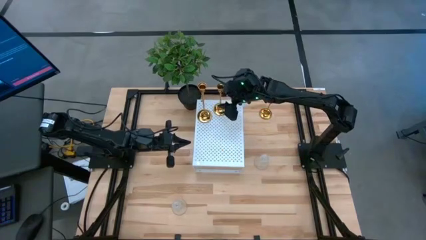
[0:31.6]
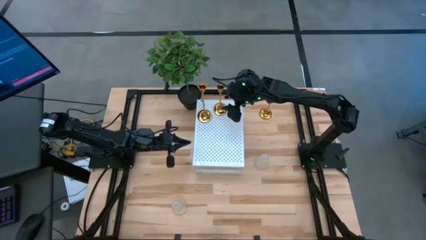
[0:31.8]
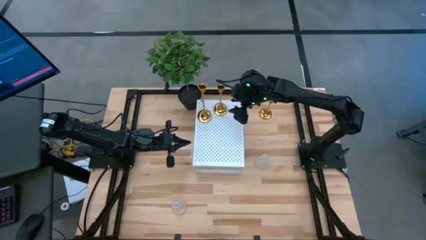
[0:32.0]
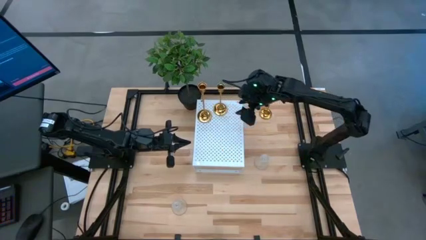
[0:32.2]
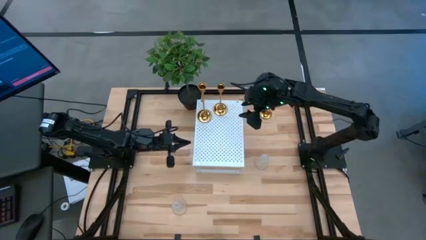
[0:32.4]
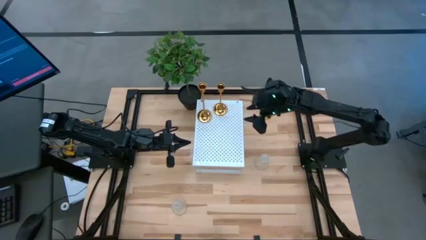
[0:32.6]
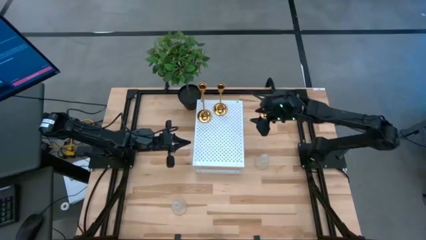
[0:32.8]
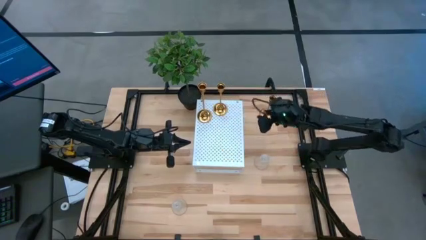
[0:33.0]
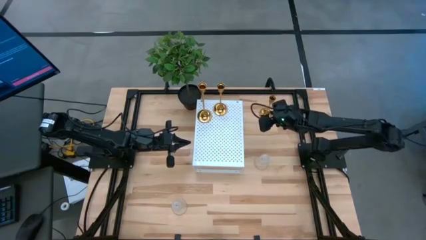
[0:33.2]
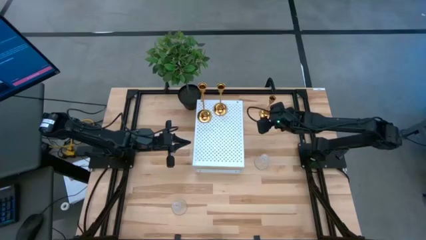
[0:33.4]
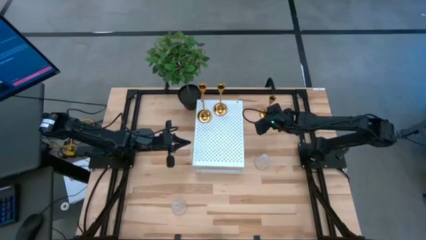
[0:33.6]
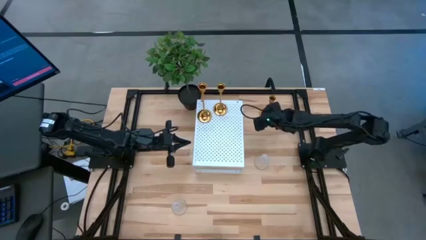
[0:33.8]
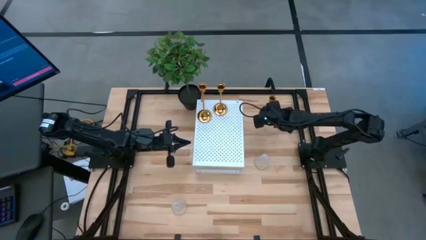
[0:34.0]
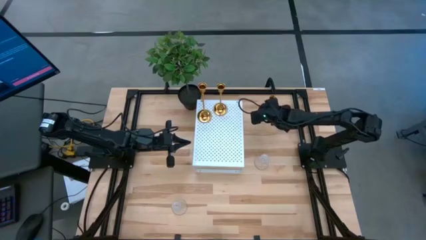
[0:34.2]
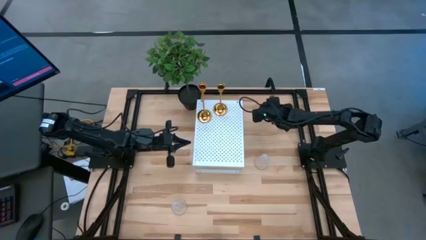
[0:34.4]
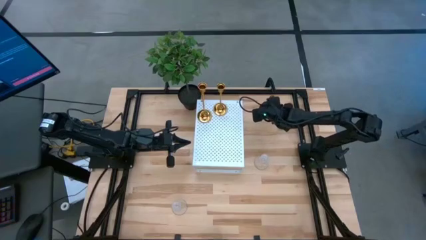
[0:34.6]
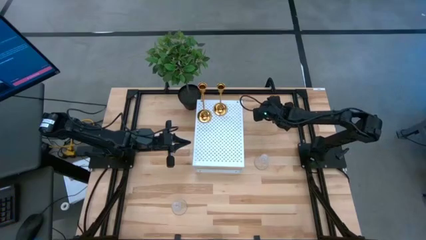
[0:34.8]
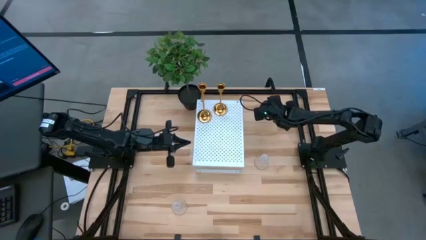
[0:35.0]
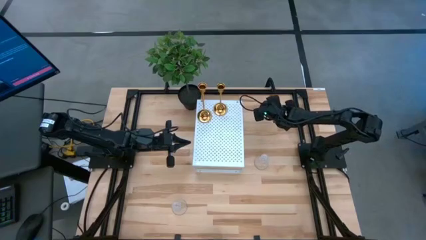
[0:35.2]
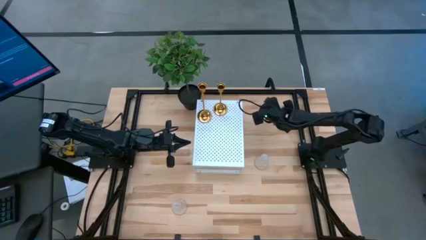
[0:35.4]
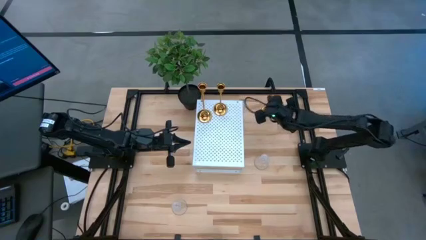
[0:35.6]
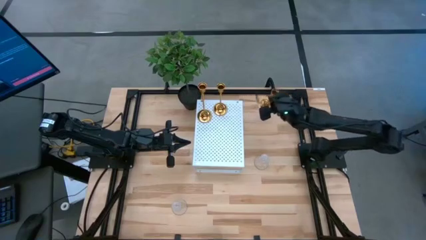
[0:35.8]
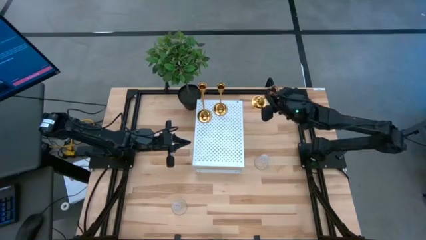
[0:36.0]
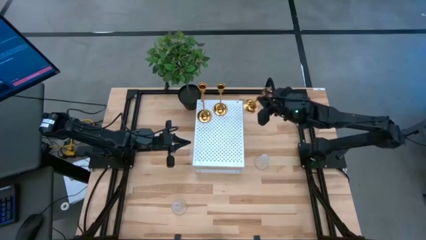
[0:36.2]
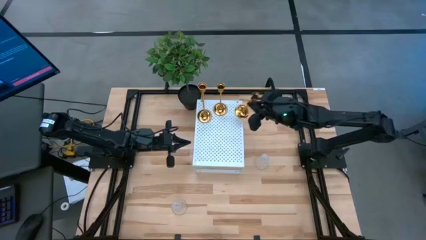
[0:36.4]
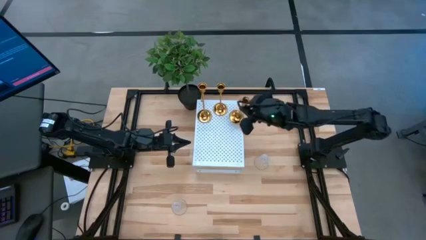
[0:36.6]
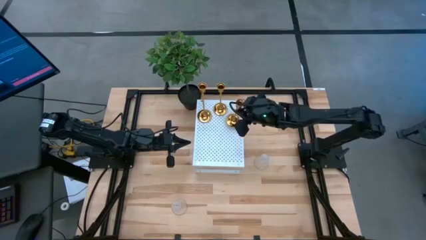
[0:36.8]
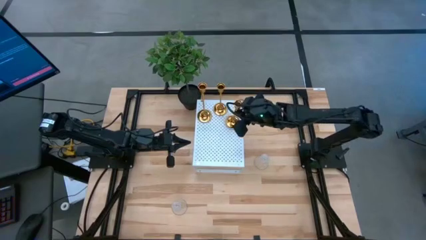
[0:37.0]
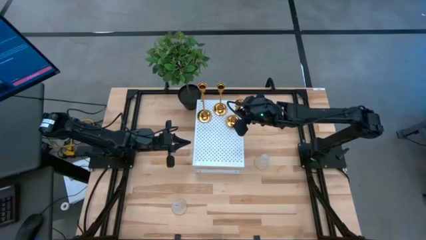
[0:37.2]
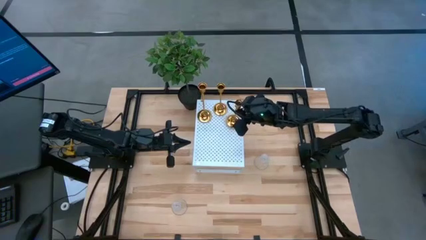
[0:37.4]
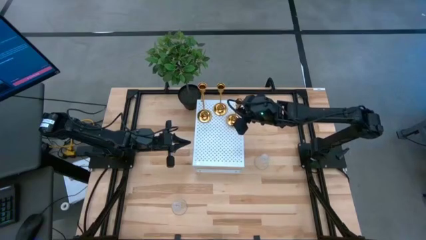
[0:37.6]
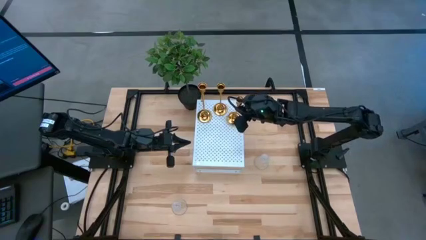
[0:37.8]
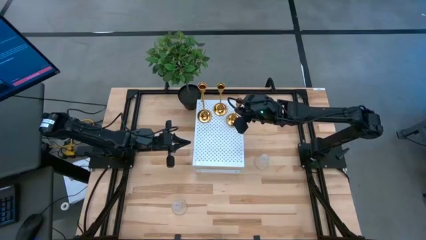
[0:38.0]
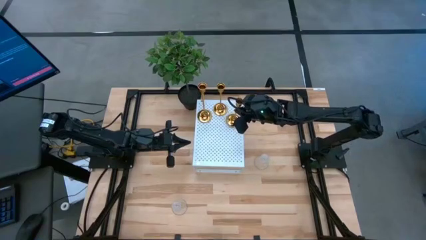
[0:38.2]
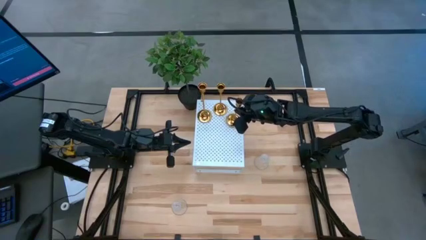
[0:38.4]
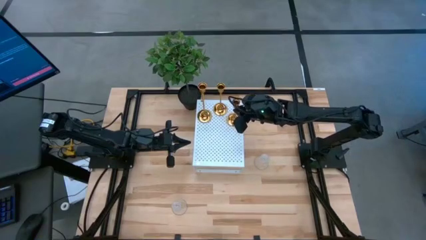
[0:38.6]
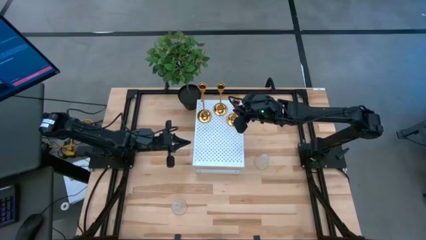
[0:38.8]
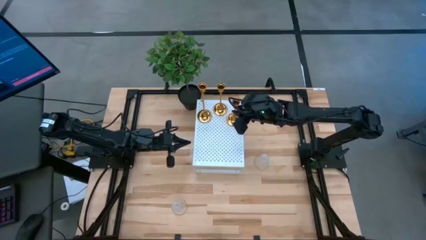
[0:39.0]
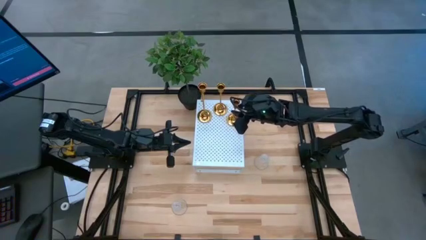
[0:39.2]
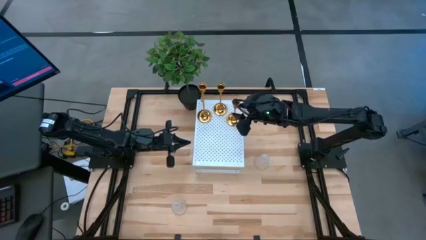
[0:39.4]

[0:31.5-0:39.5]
Task: Pick & Place candle stick holders
Put the gold candle holder on the shelf

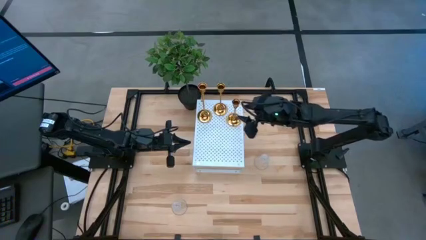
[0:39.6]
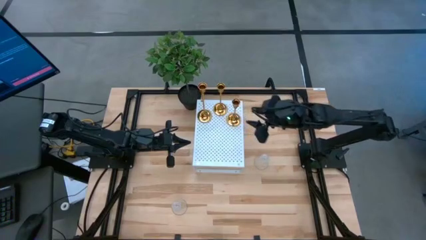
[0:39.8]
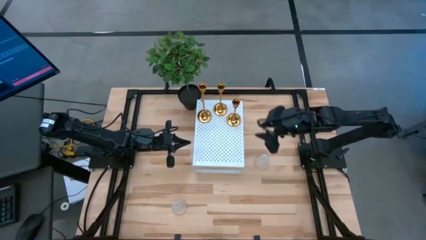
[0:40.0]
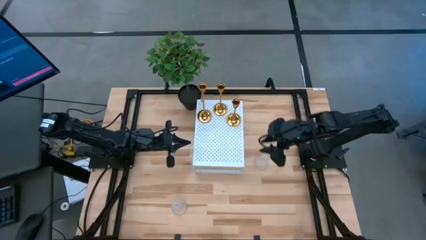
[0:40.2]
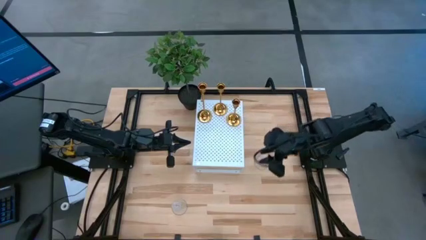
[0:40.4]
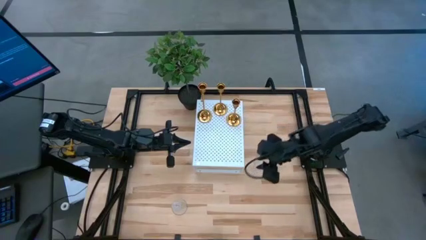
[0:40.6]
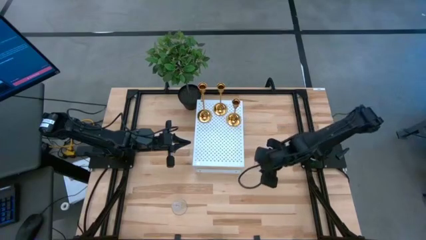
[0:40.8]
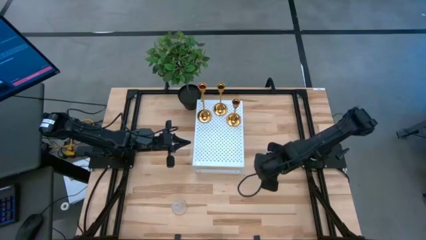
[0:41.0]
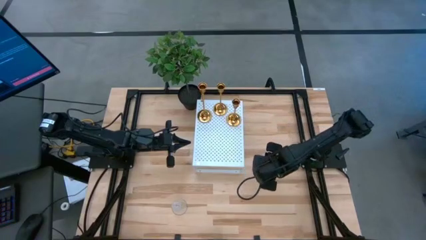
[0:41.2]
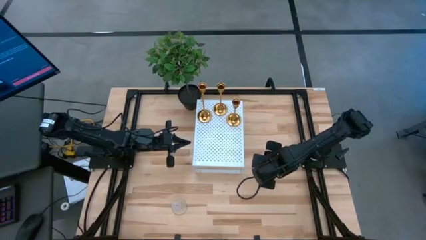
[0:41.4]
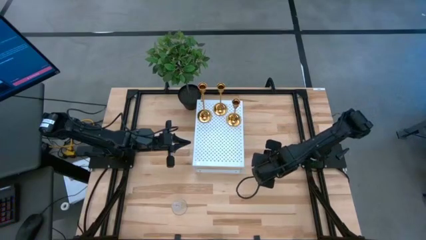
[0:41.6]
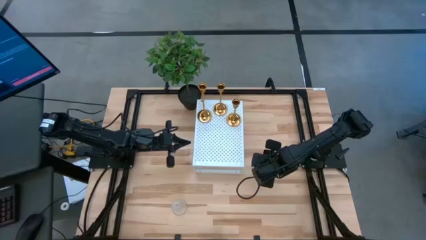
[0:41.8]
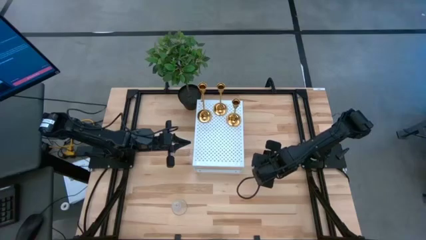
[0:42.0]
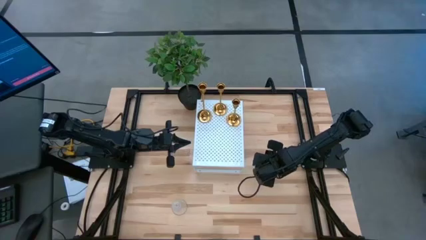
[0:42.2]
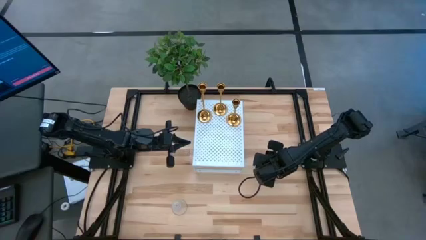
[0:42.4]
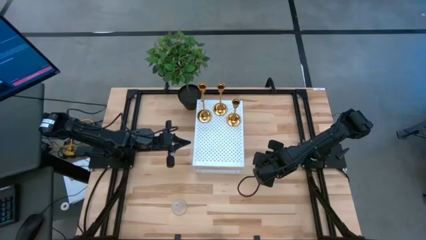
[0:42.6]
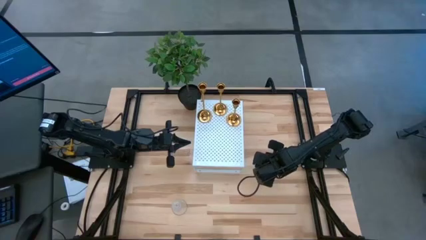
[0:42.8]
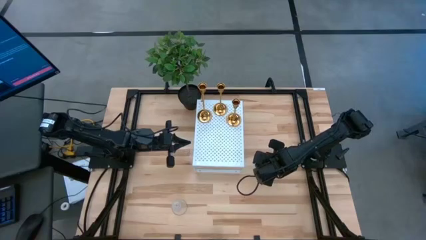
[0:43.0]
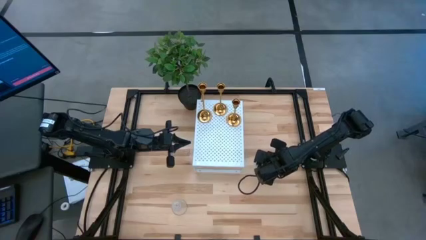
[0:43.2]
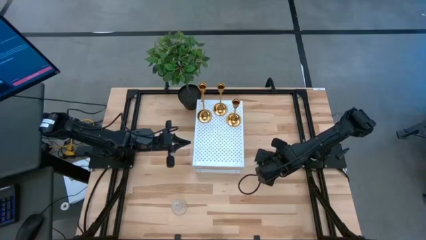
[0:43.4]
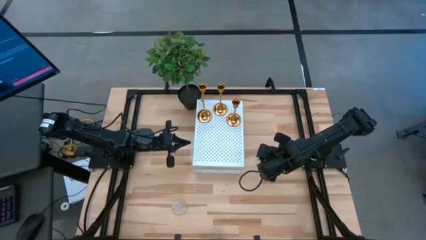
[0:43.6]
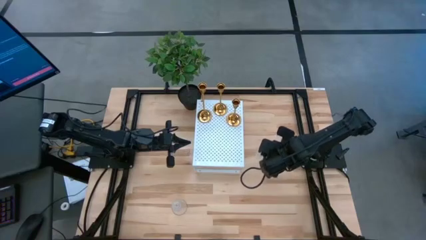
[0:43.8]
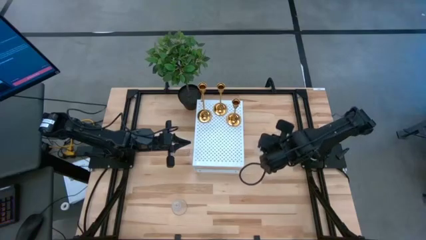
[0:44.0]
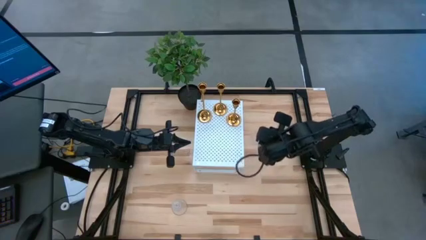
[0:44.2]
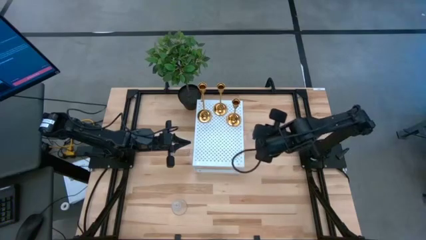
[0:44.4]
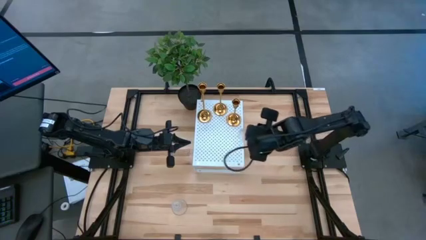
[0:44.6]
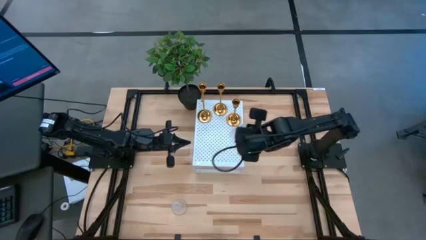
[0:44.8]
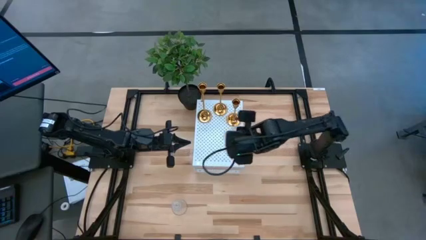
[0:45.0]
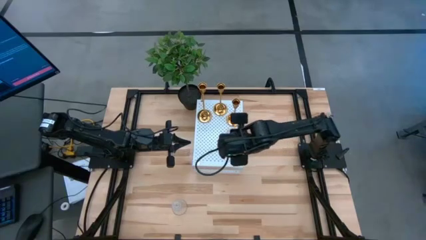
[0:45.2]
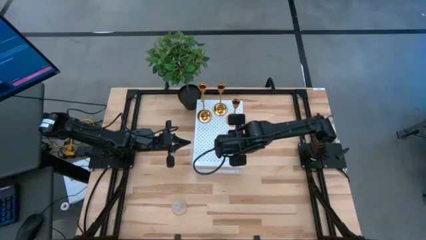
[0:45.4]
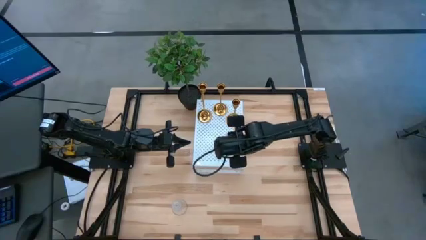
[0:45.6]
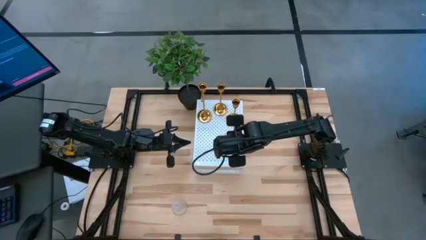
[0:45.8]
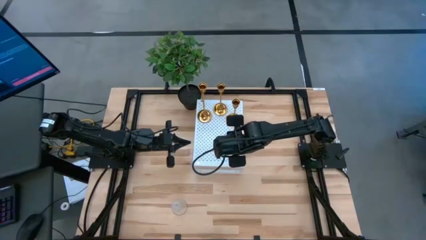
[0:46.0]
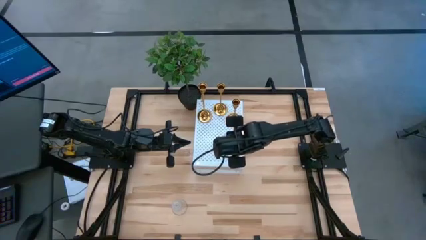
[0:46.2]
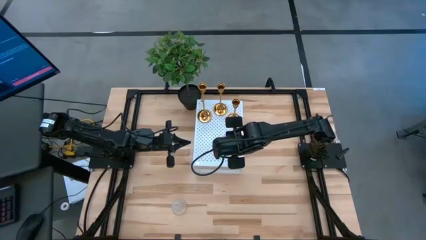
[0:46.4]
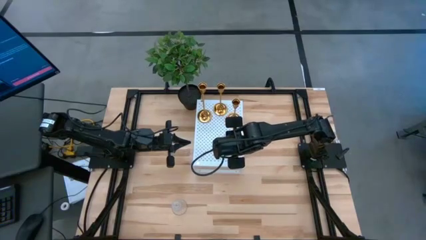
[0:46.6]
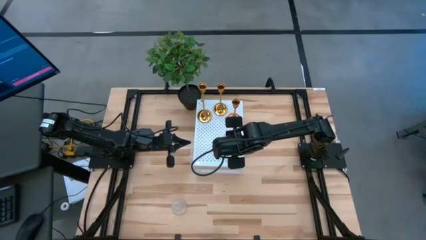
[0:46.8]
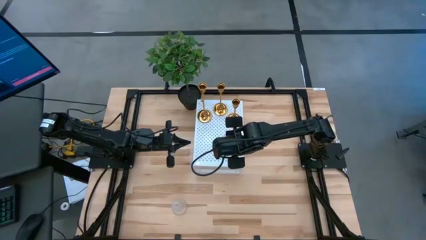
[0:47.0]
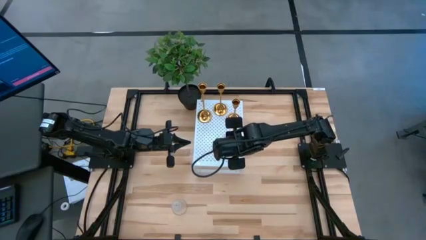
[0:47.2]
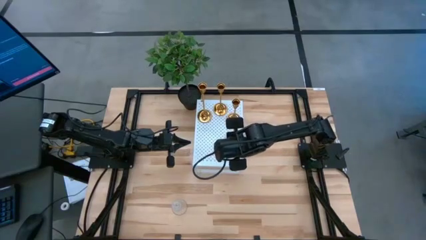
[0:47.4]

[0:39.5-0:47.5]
Put the top transparent candle holder on the shelf
